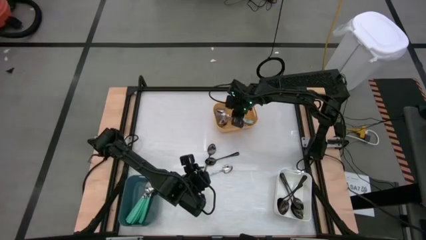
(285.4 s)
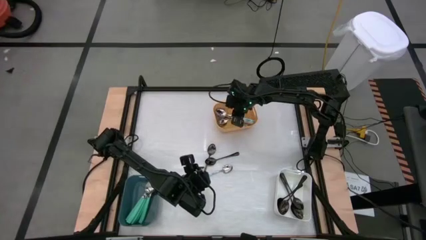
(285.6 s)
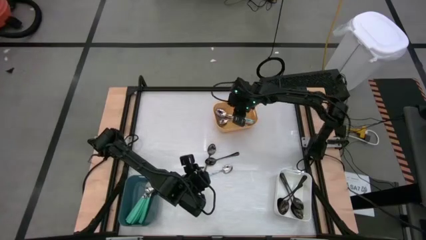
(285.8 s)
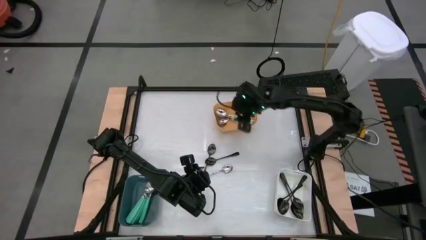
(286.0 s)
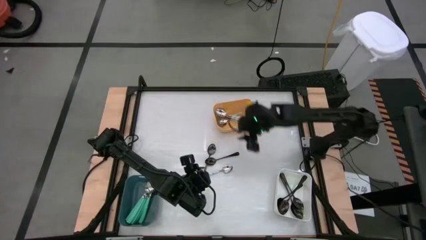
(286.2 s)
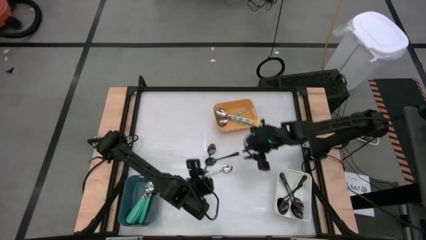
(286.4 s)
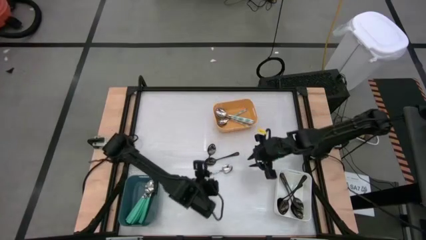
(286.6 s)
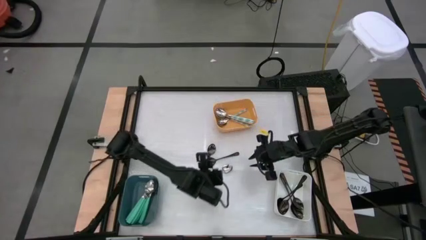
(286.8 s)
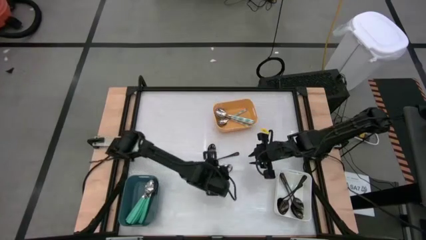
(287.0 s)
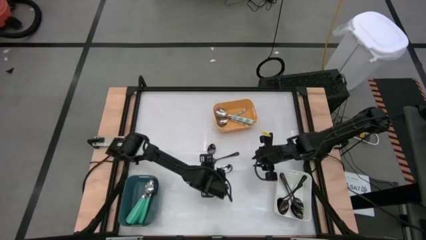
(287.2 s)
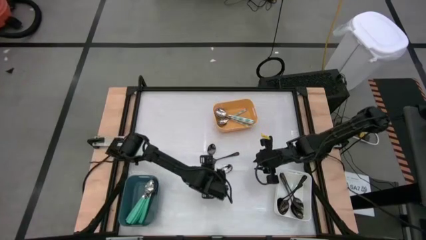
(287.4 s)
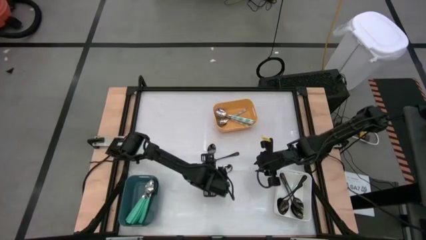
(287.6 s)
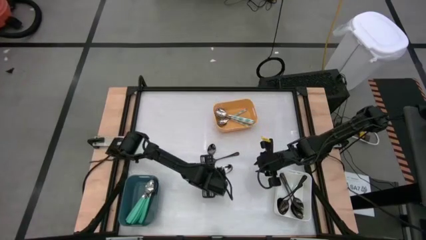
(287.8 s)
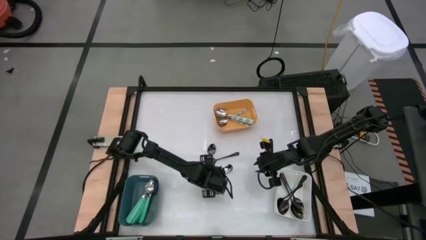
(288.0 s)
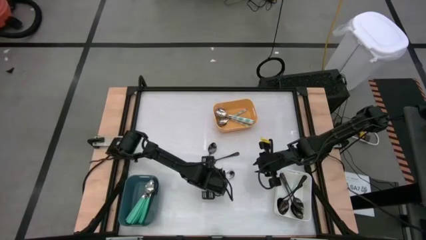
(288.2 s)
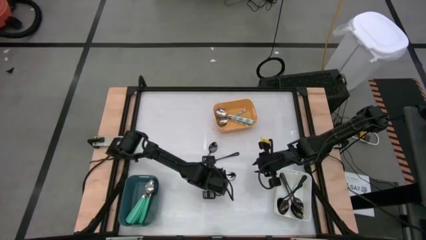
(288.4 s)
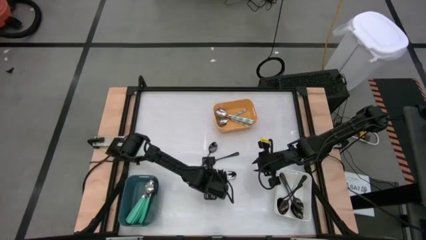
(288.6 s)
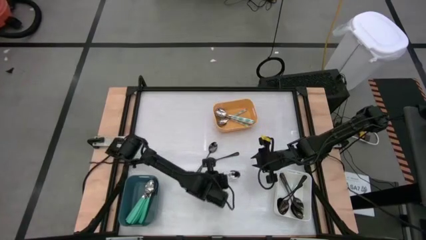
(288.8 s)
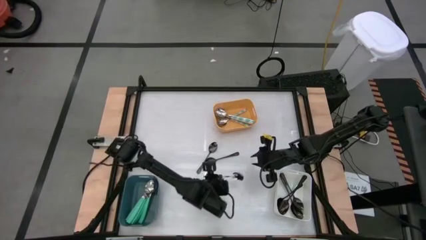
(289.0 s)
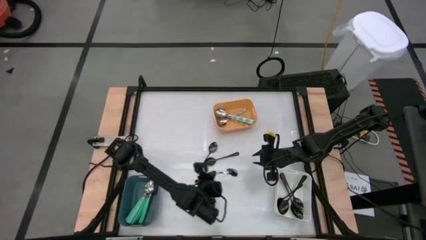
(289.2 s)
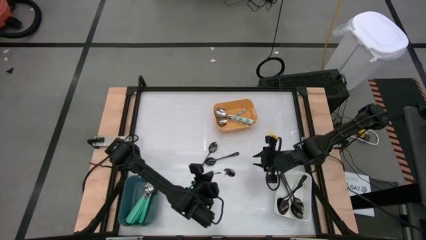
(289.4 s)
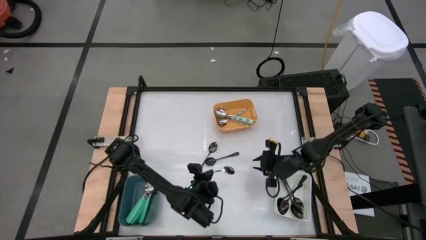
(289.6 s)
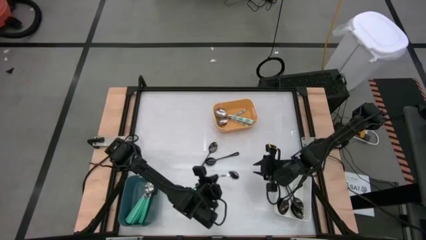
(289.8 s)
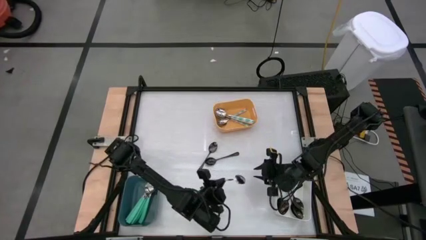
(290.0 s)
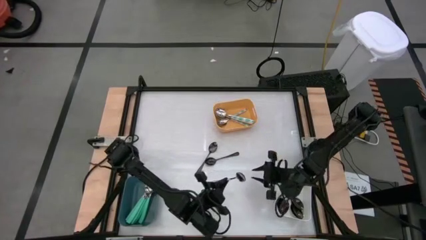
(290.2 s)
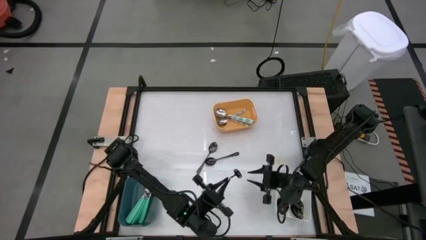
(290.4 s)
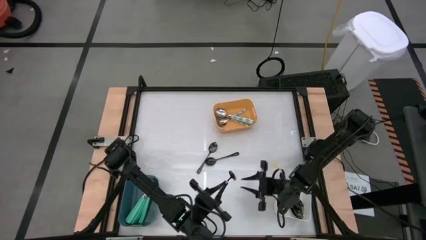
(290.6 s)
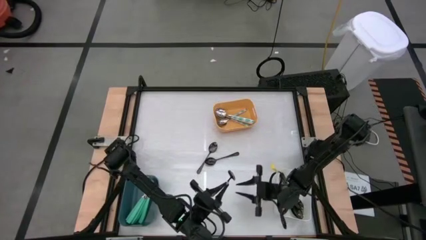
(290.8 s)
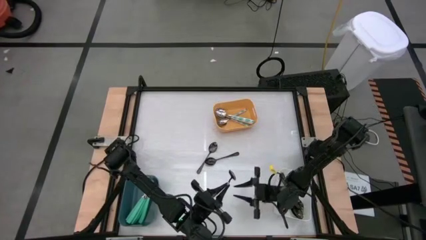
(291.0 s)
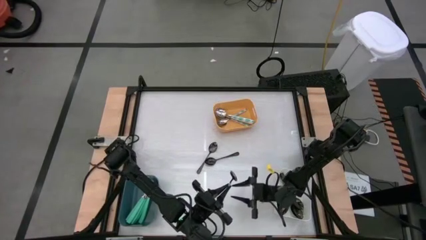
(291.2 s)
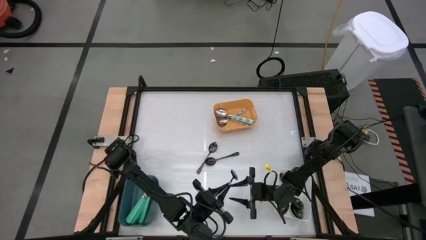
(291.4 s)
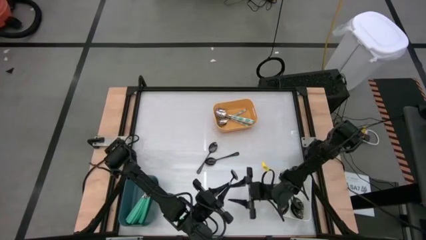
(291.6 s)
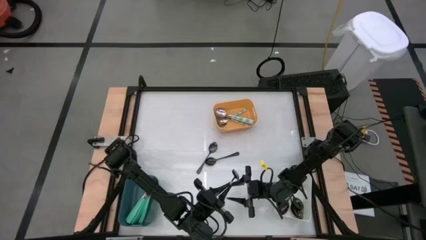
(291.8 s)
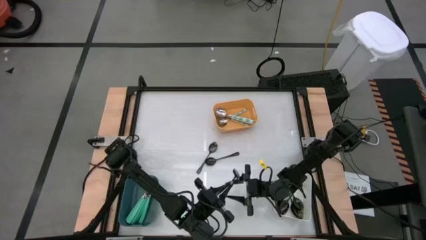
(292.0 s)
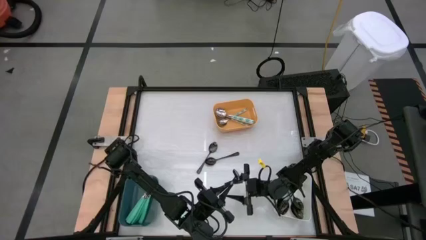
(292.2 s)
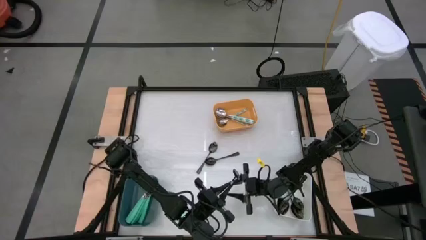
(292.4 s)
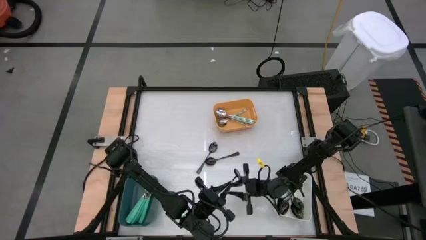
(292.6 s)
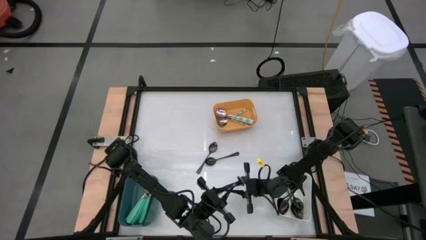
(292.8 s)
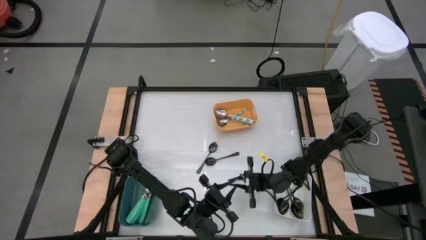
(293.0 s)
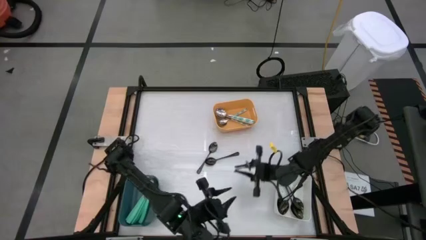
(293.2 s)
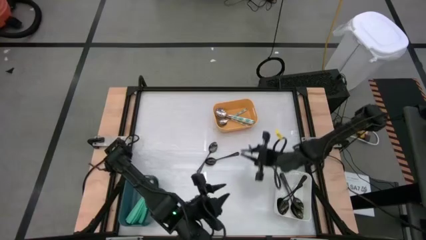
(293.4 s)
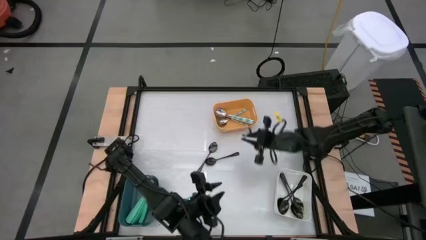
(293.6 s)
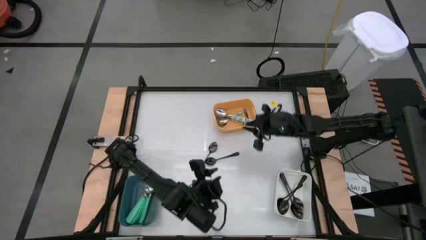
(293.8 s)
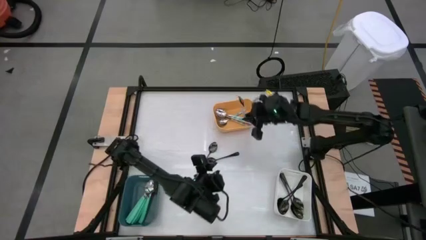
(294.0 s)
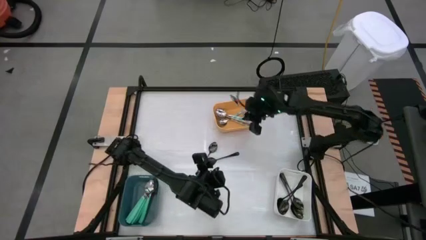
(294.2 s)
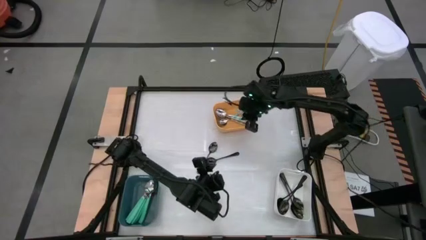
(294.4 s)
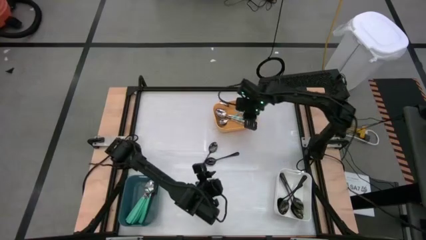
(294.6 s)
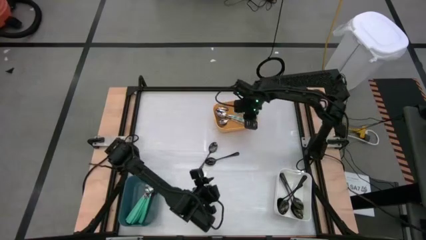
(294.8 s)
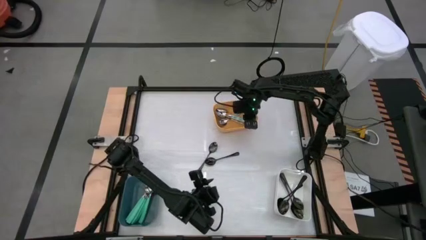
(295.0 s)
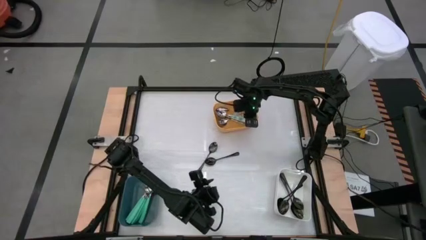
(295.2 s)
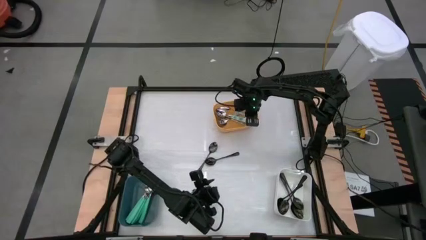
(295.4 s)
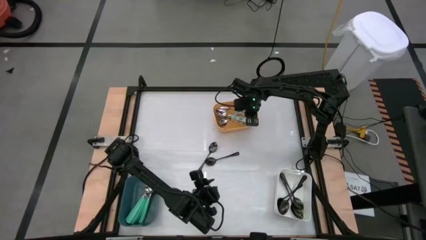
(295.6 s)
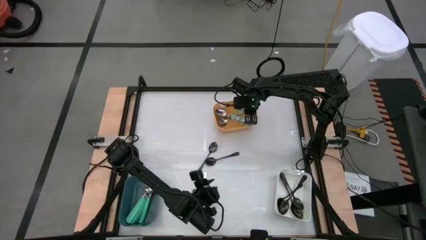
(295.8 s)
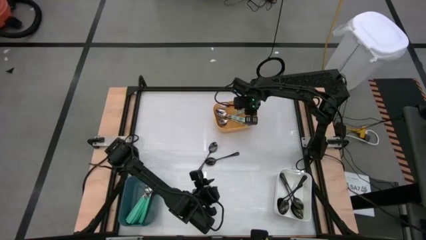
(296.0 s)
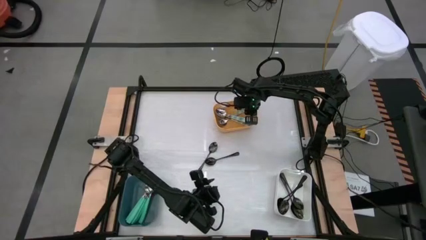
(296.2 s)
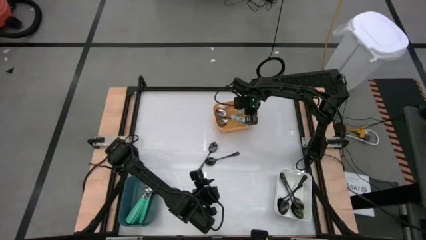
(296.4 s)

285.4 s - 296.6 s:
Task: Sort silverware by color (type)
Put the white patterned spoon into the yellow bin

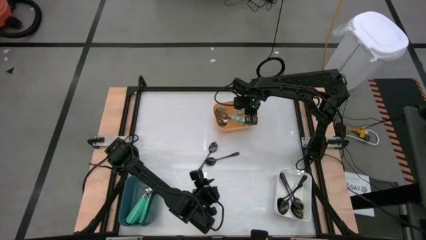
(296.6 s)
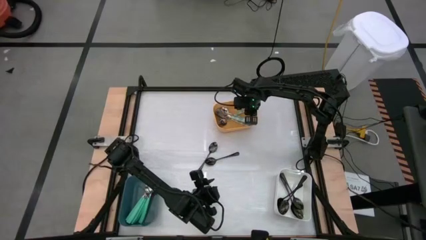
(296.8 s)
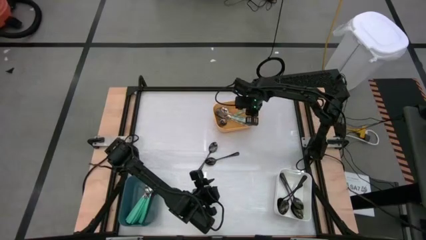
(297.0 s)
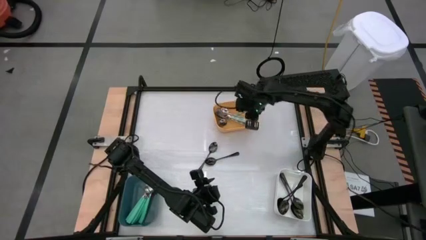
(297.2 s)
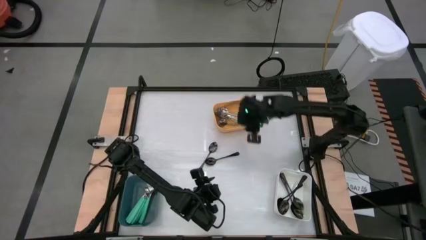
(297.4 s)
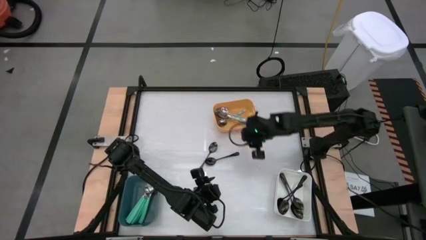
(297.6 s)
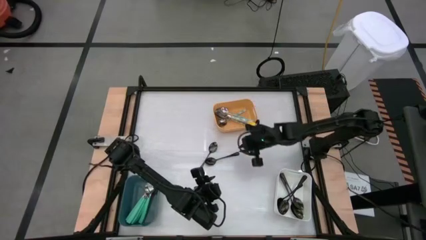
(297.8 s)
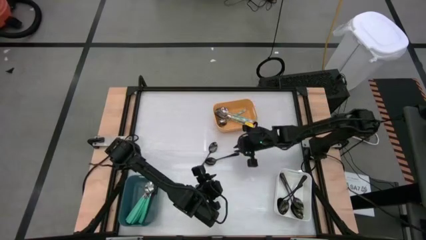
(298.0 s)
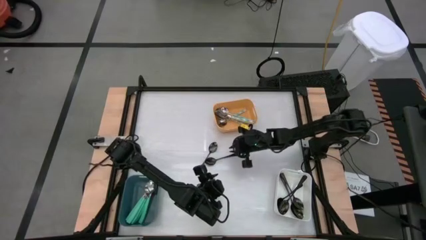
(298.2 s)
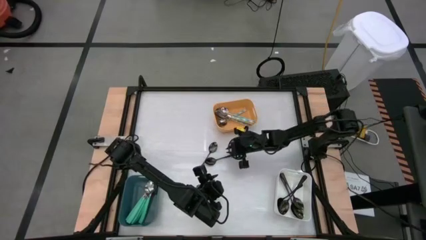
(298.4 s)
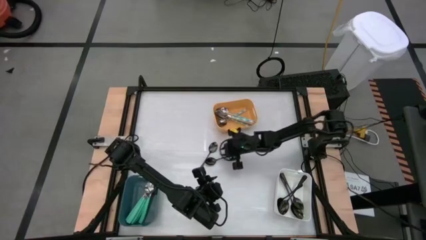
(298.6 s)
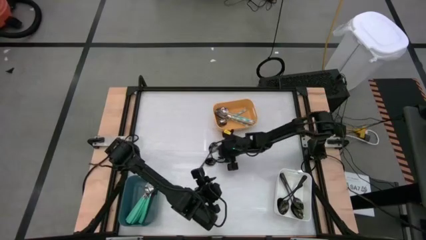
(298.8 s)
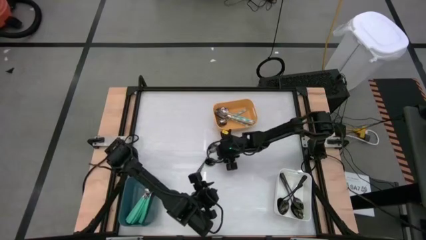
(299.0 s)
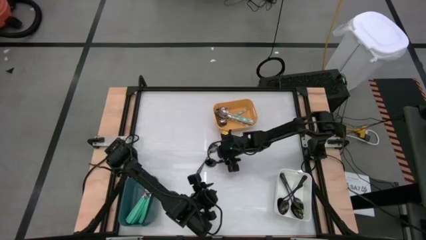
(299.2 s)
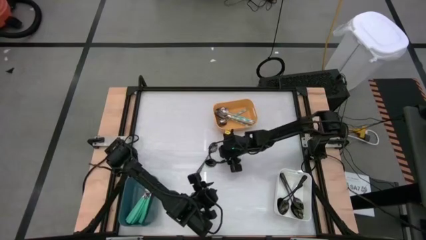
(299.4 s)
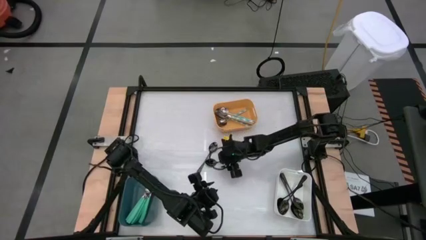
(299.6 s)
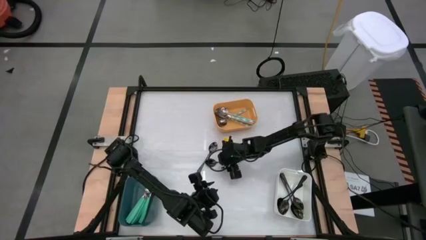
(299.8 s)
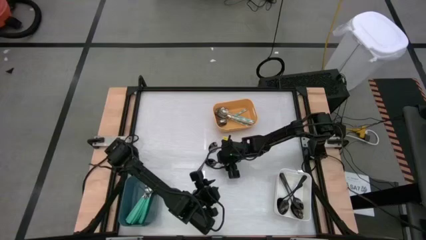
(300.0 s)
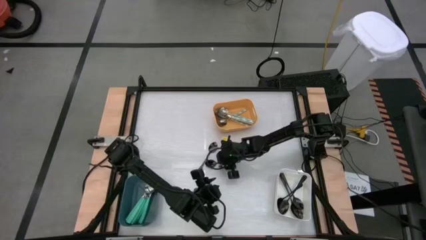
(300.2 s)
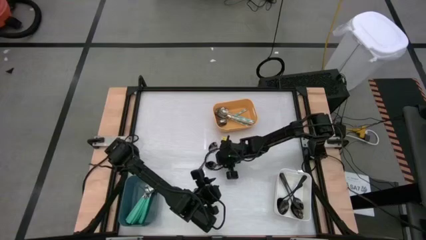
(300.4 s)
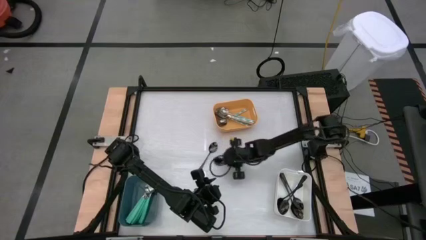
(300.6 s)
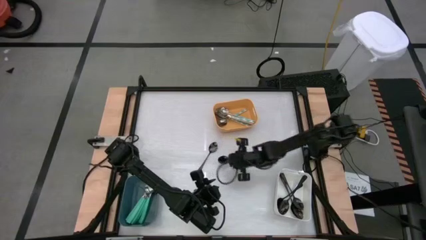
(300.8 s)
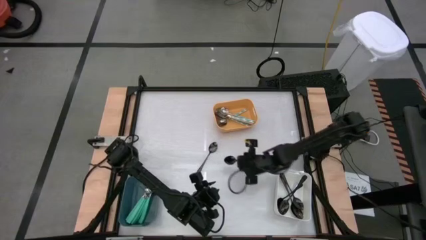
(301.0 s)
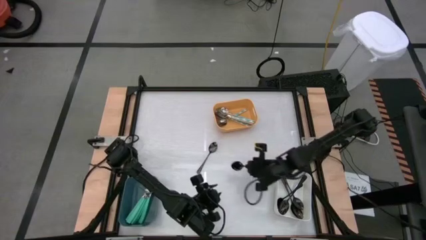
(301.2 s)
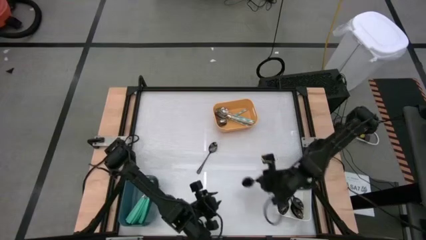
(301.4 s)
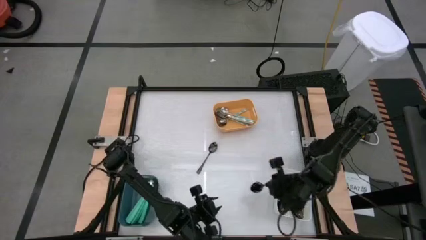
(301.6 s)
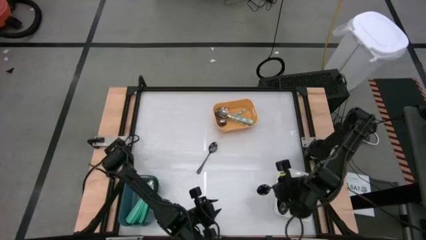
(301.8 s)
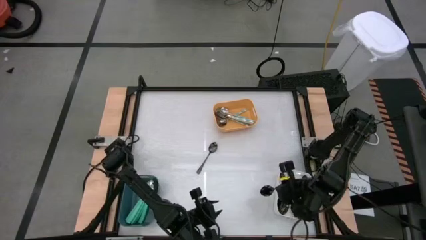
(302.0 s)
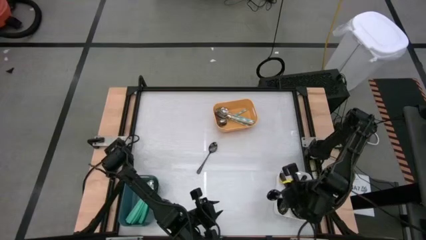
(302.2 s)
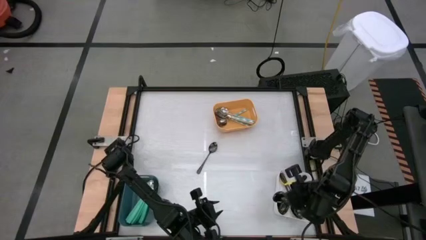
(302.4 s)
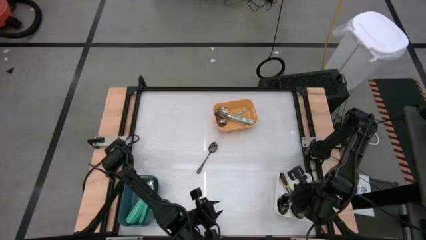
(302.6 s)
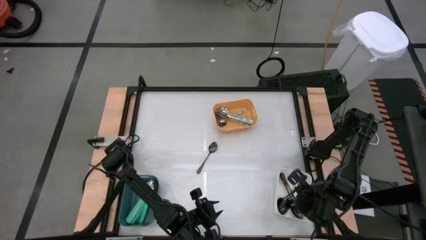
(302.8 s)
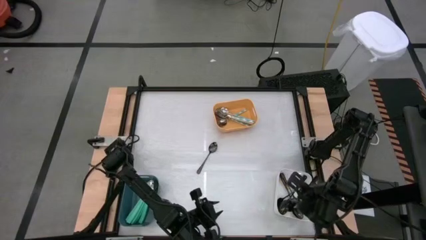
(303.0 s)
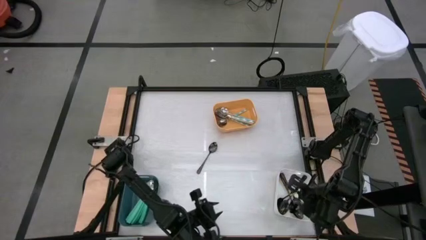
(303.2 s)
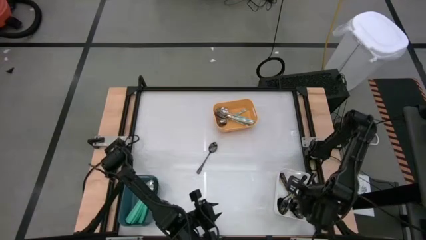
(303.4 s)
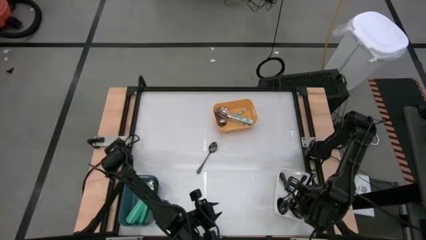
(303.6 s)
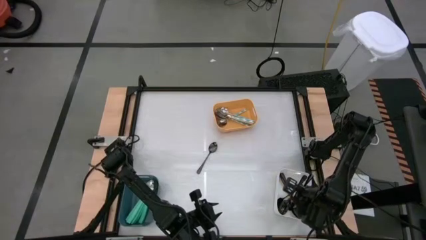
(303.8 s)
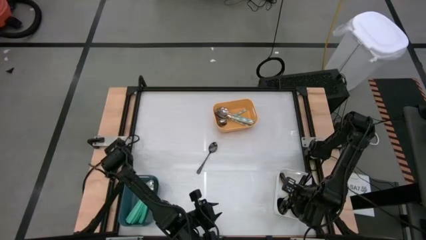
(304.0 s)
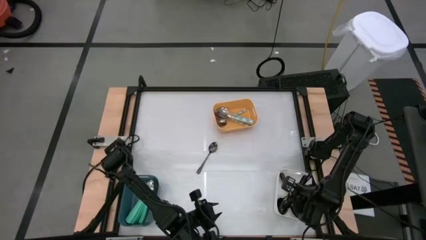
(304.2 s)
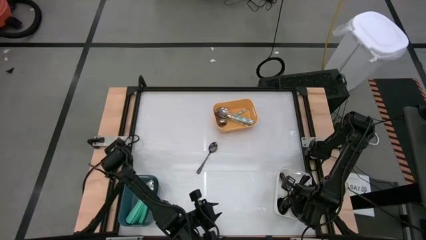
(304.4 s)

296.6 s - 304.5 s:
Put the black spoon into the white bin
